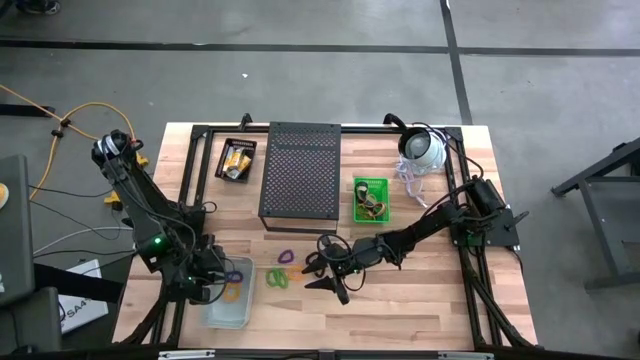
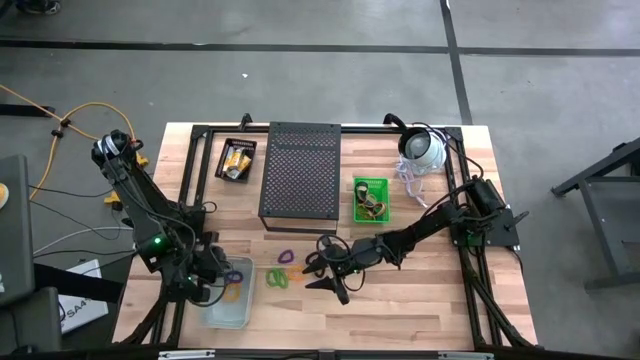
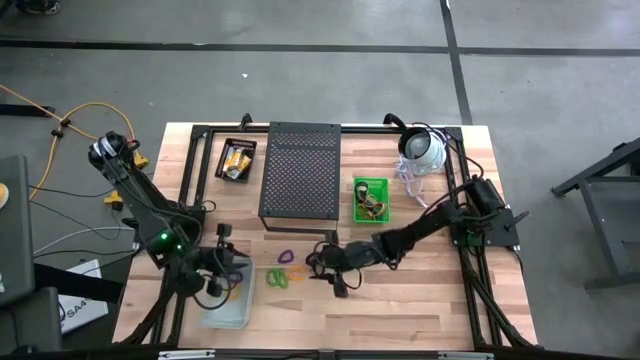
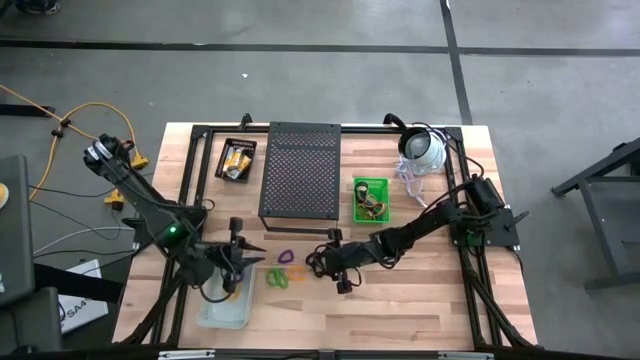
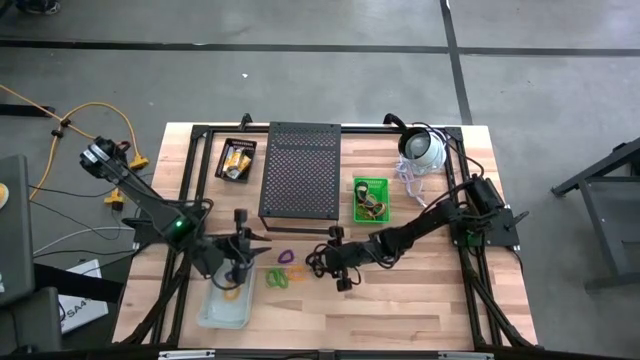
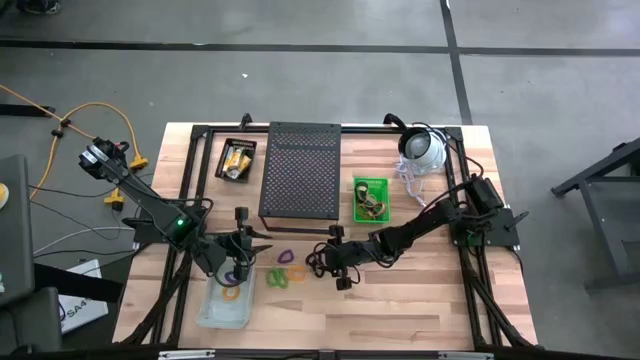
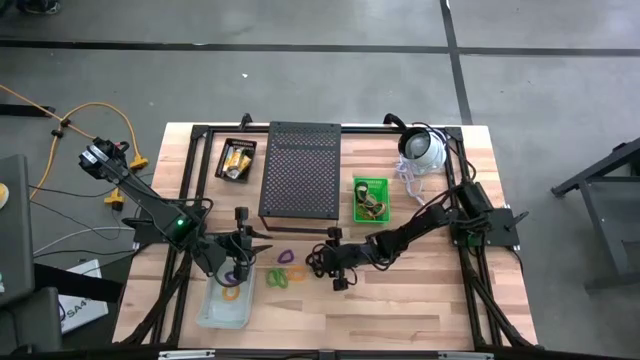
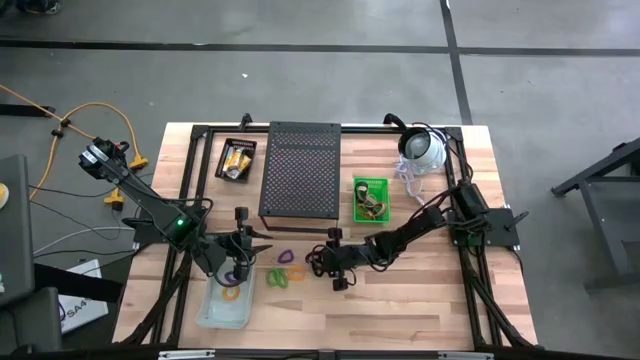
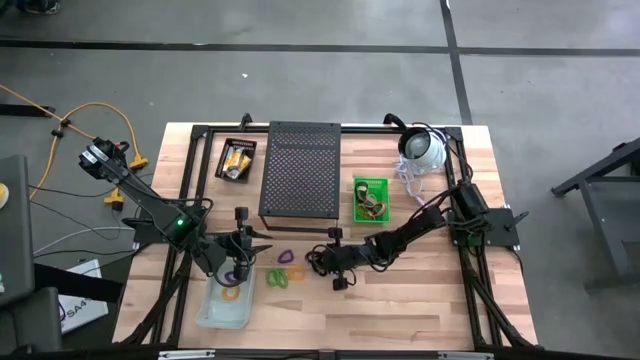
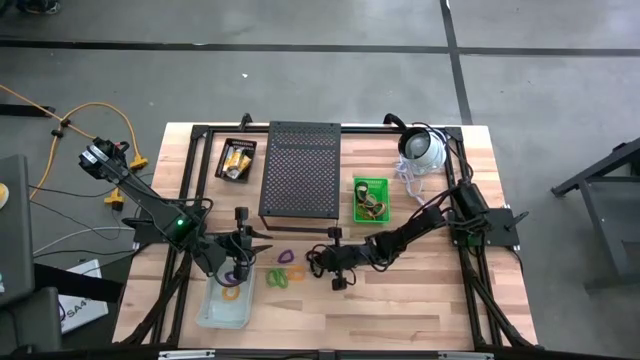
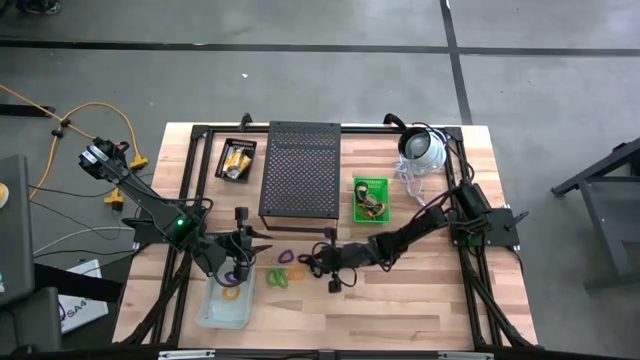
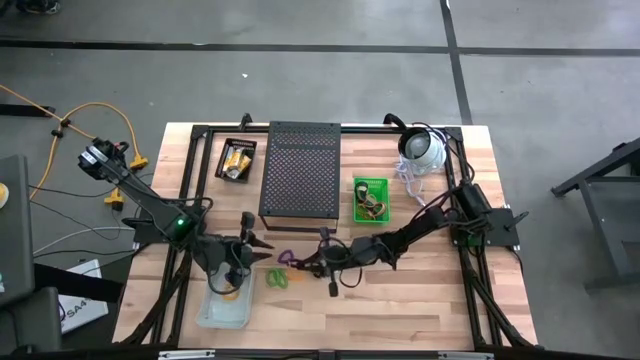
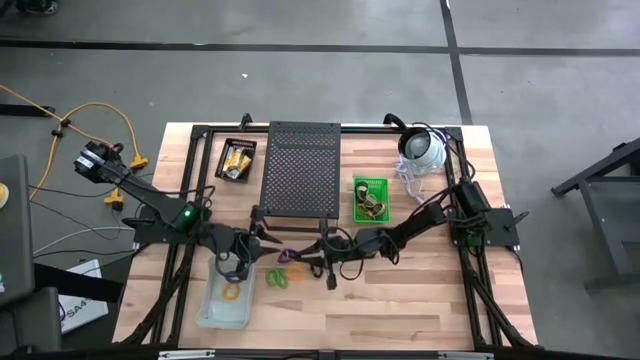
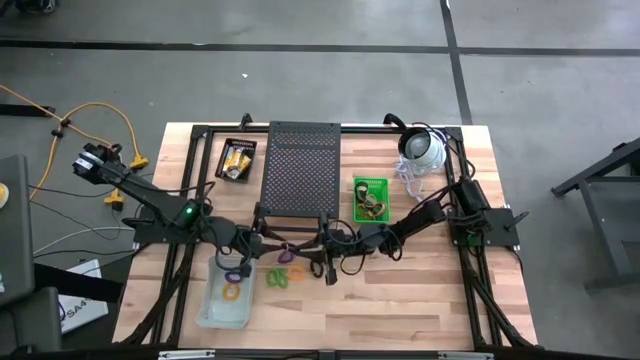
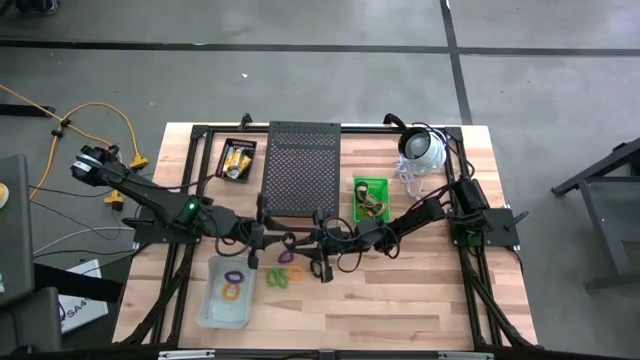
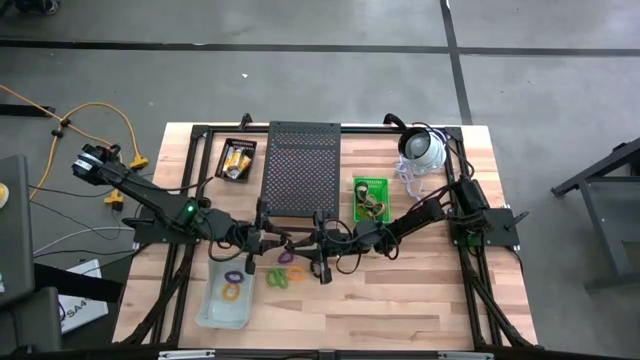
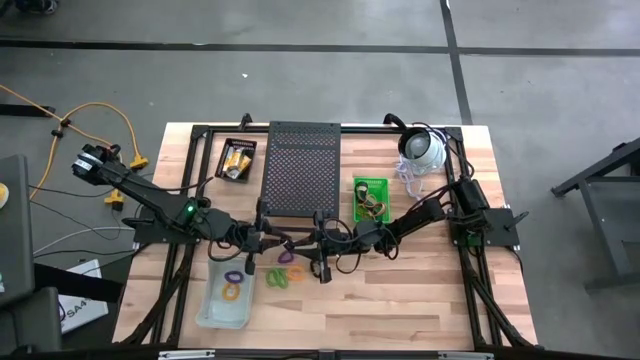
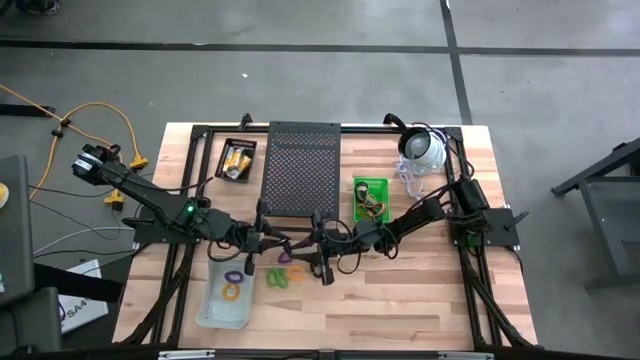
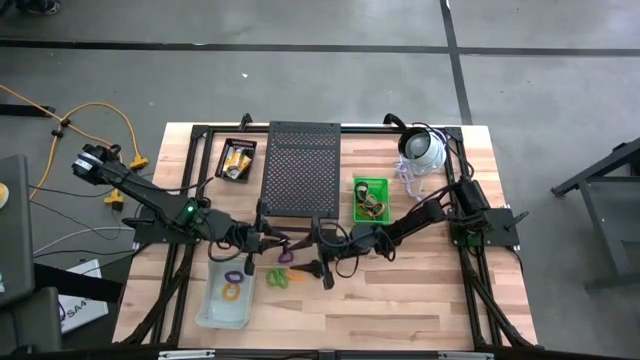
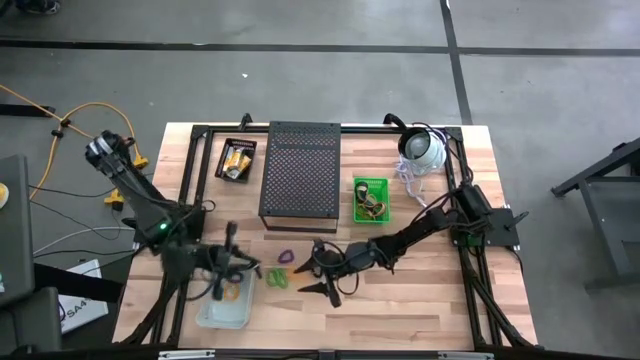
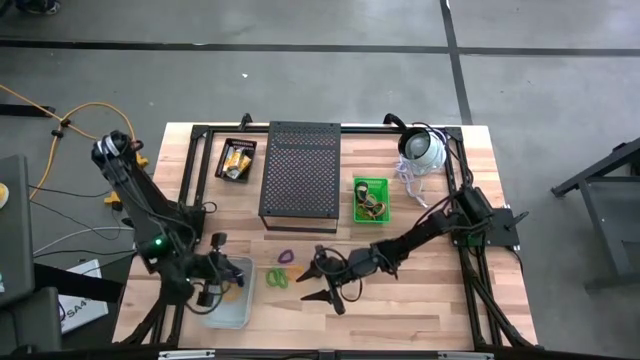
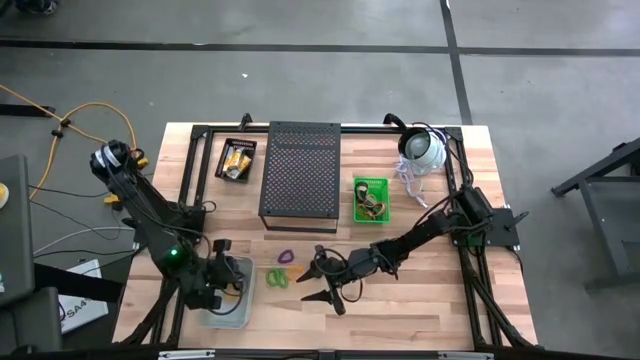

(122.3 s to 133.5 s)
Task: Pick & Place Office Desk Supplies
Put the top black spring keychain into the gray bin

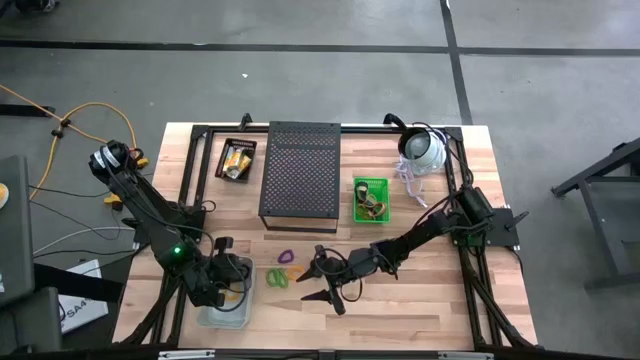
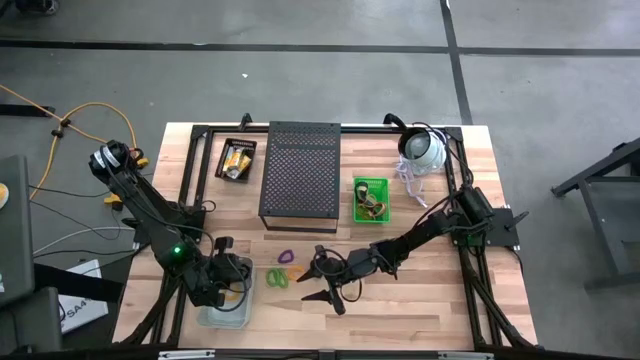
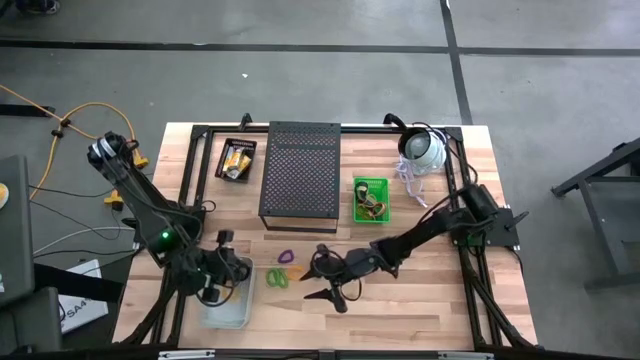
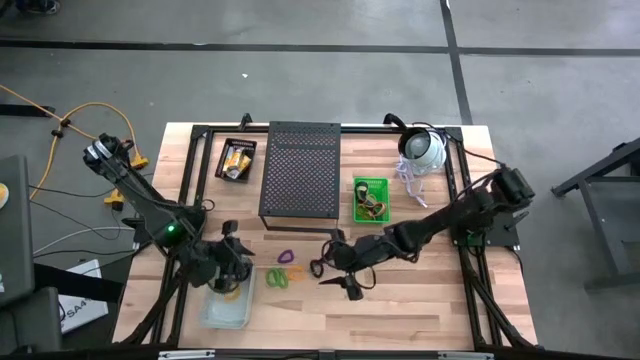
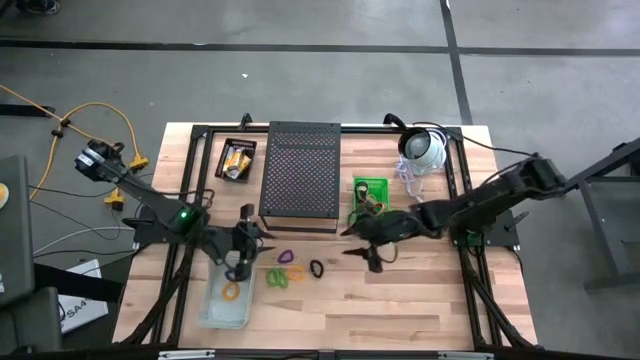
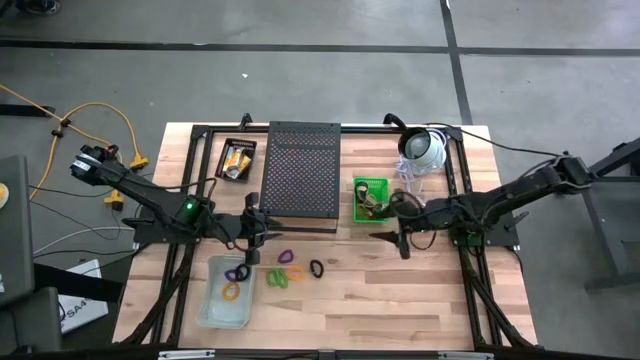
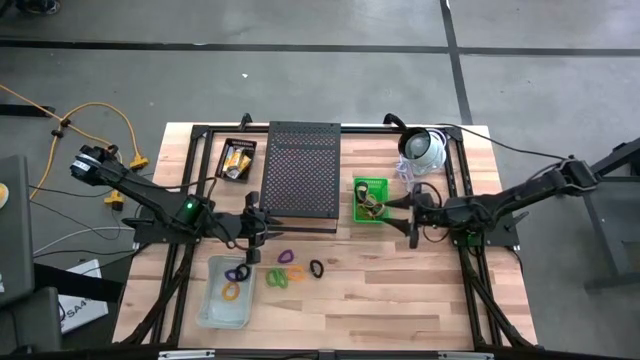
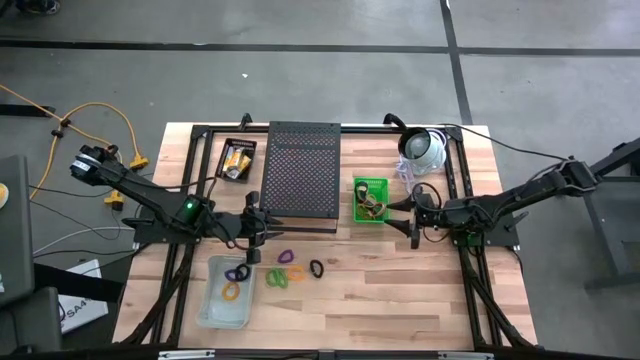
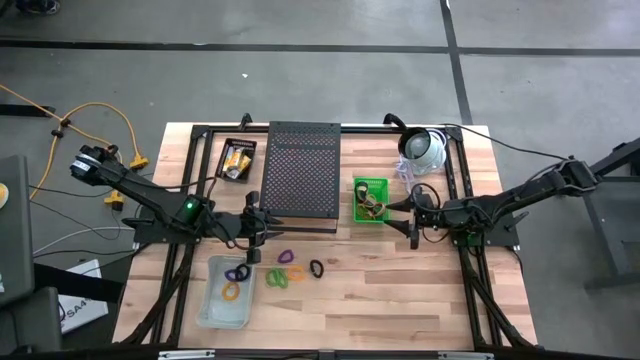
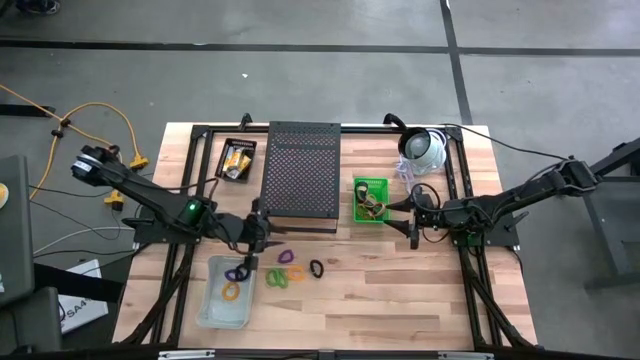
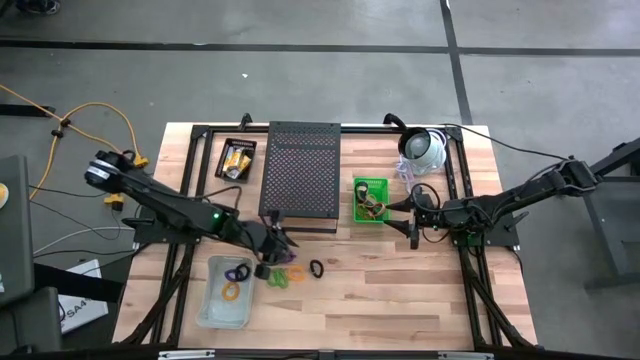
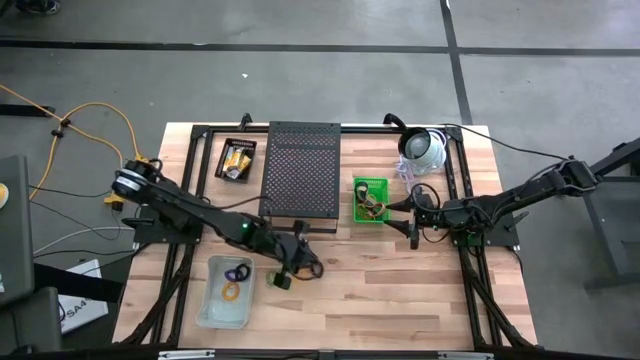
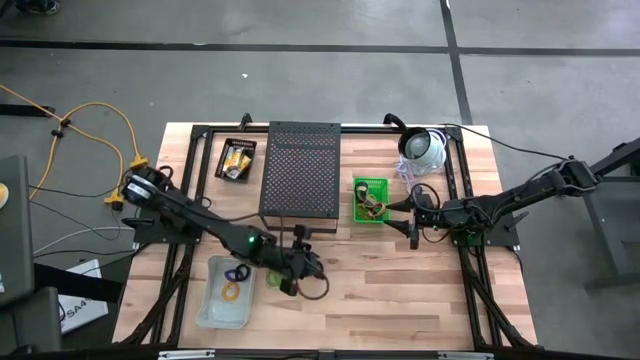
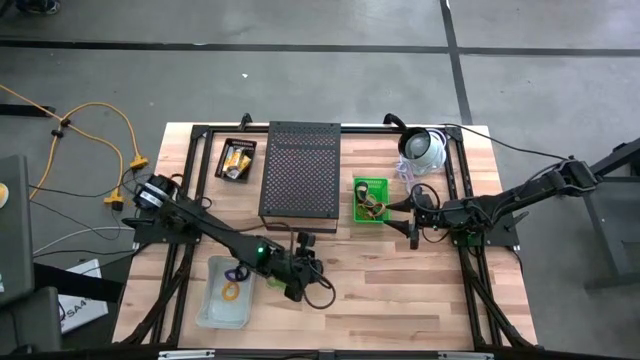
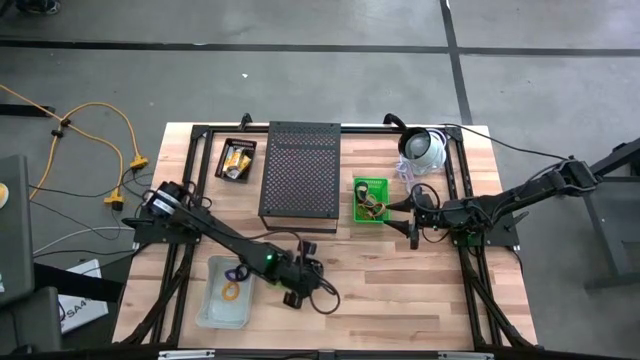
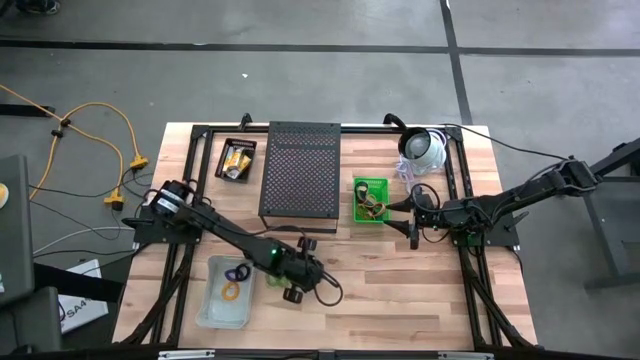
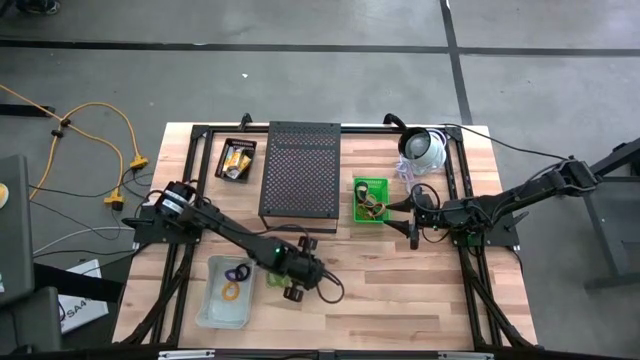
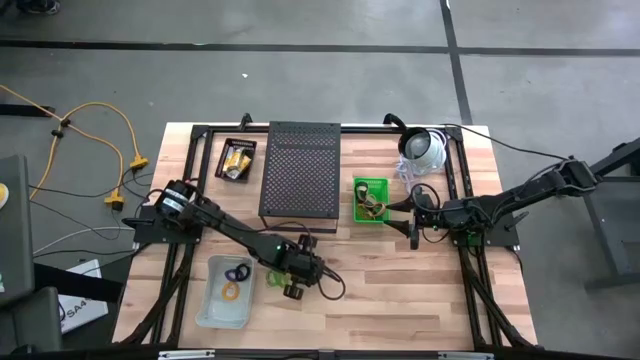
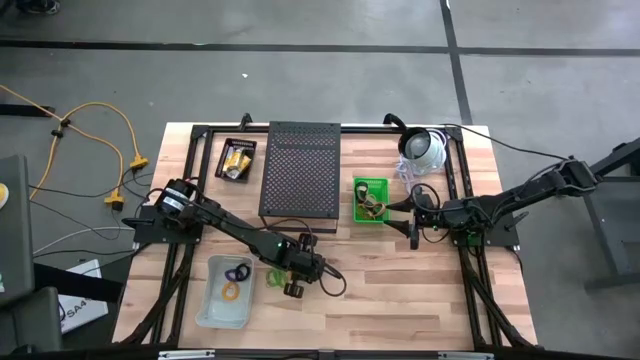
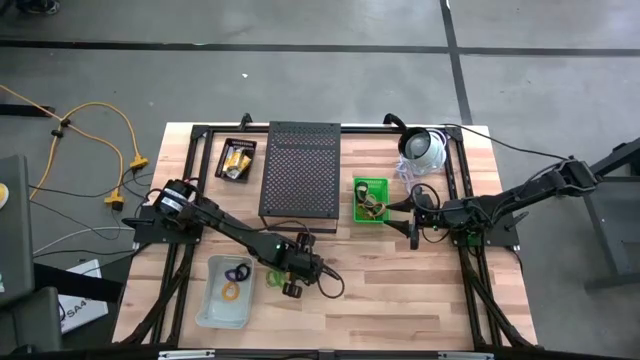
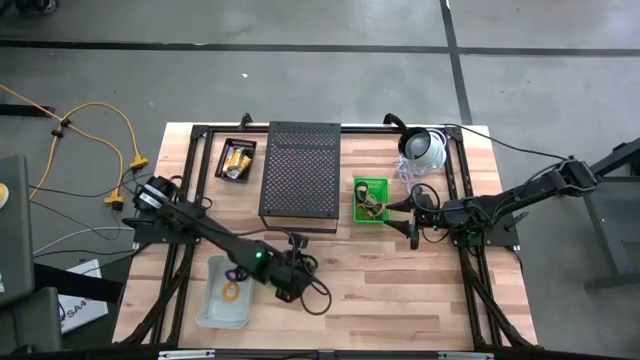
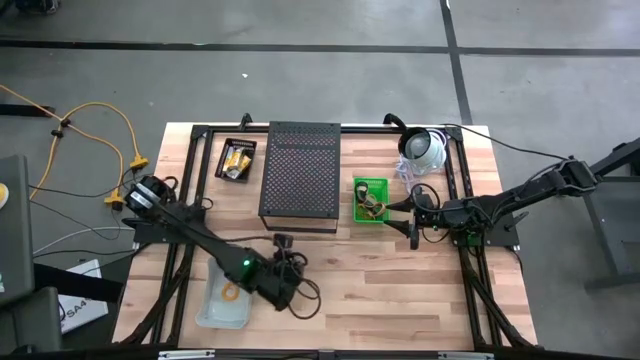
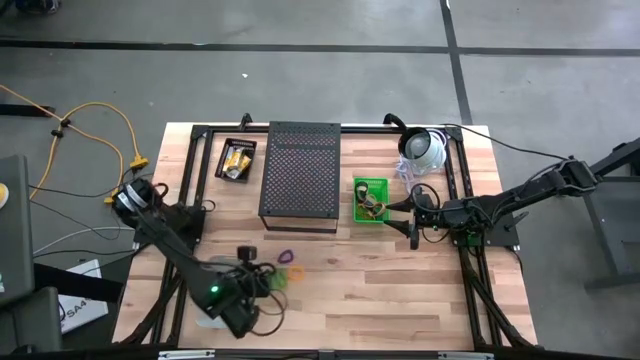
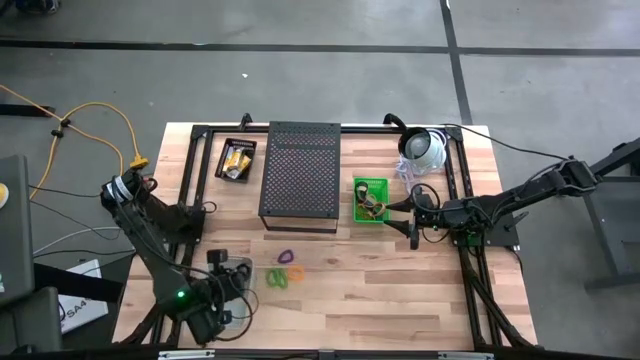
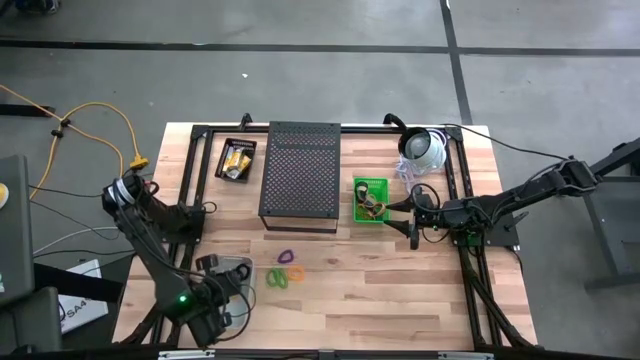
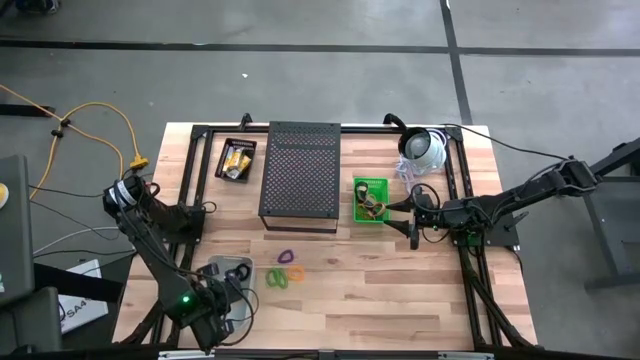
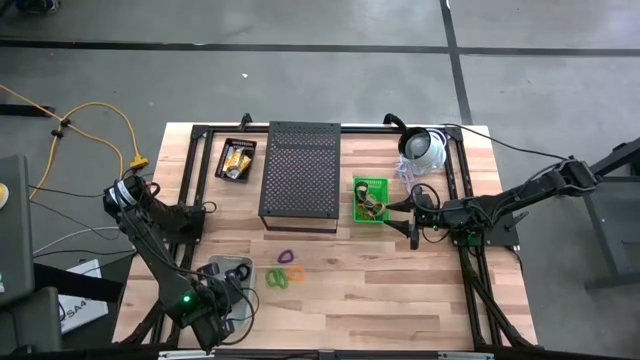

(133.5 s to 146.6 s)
Put the black spring keychain into the gray bin
